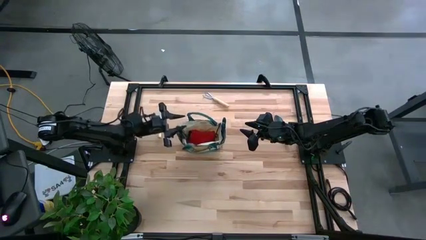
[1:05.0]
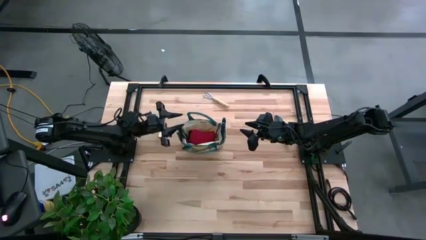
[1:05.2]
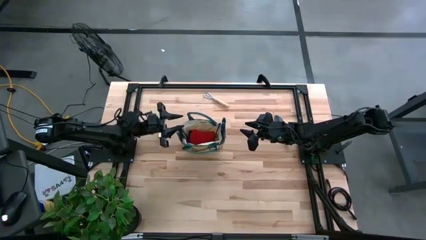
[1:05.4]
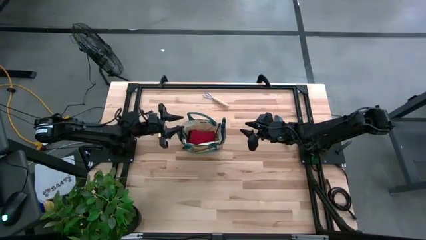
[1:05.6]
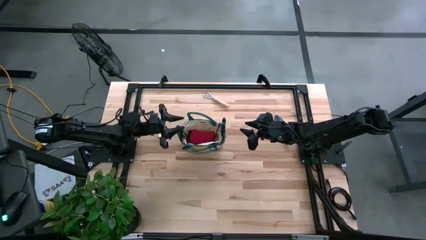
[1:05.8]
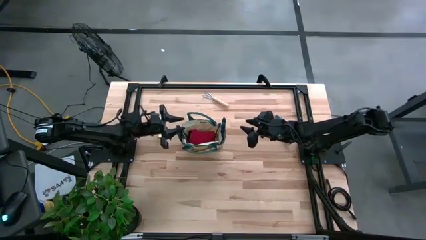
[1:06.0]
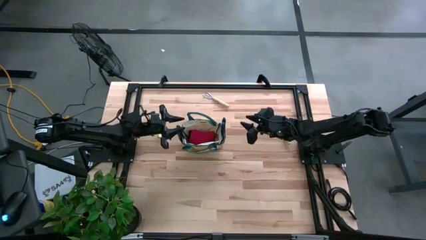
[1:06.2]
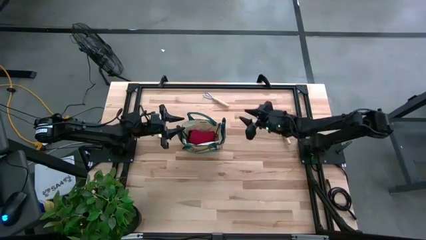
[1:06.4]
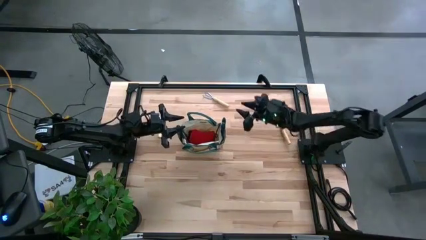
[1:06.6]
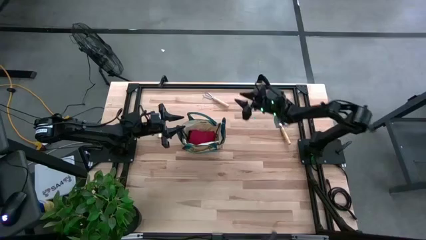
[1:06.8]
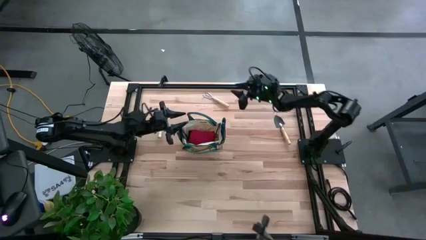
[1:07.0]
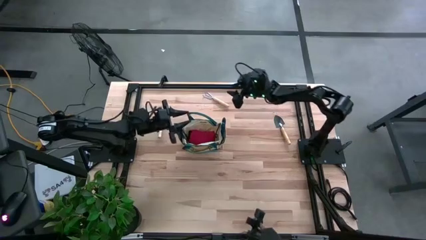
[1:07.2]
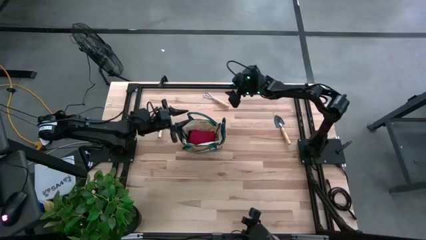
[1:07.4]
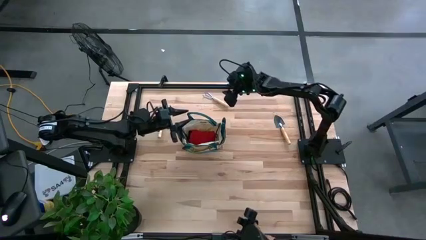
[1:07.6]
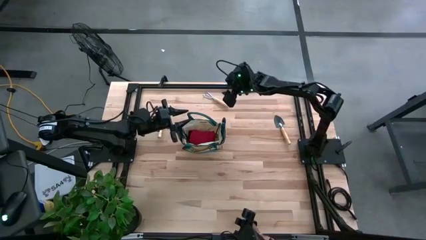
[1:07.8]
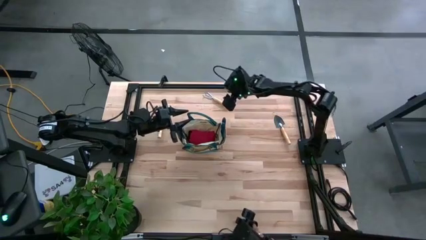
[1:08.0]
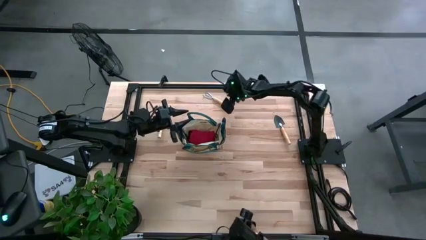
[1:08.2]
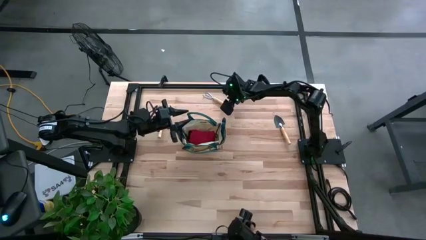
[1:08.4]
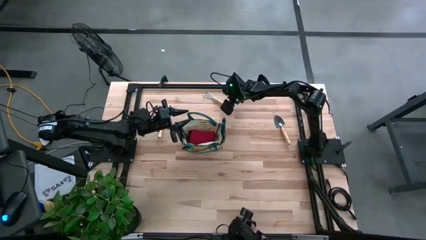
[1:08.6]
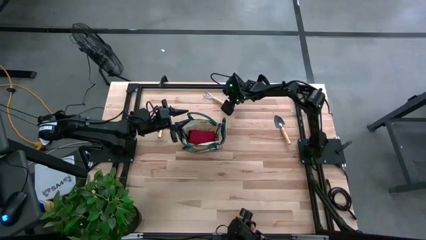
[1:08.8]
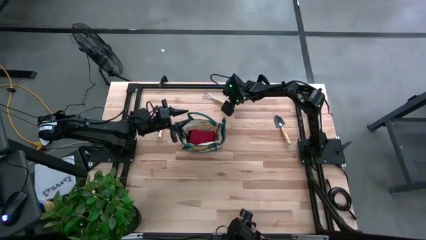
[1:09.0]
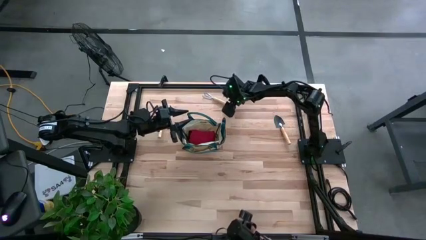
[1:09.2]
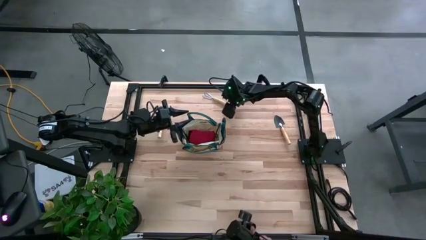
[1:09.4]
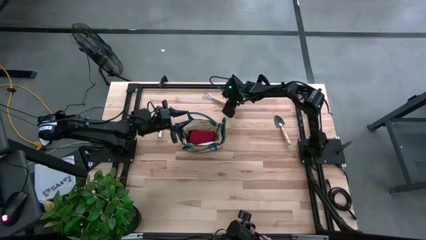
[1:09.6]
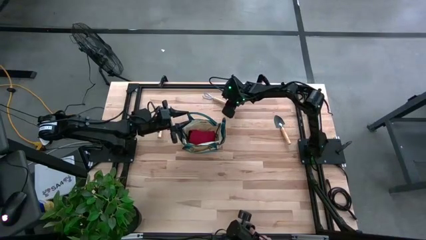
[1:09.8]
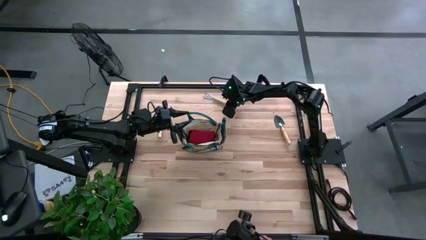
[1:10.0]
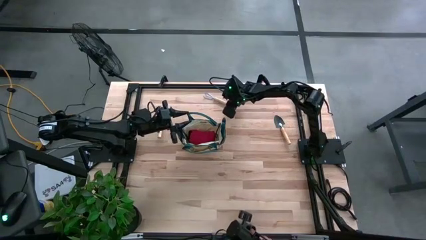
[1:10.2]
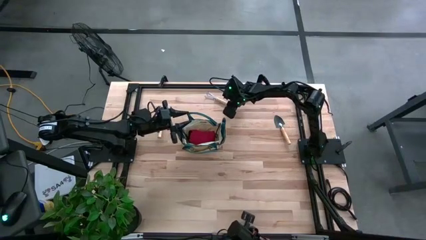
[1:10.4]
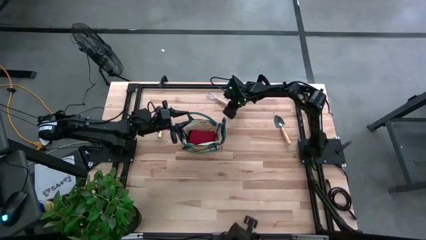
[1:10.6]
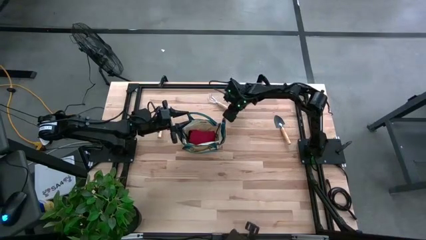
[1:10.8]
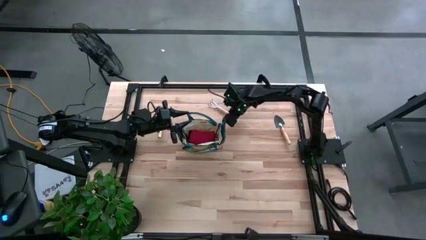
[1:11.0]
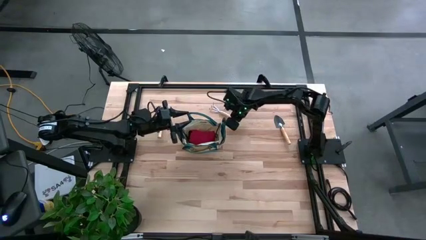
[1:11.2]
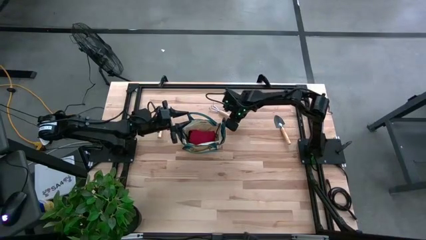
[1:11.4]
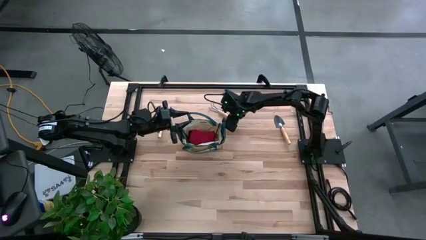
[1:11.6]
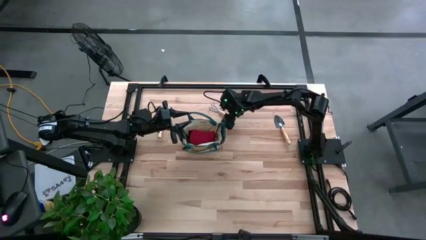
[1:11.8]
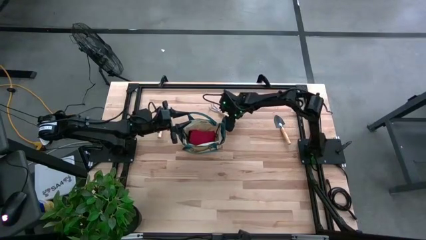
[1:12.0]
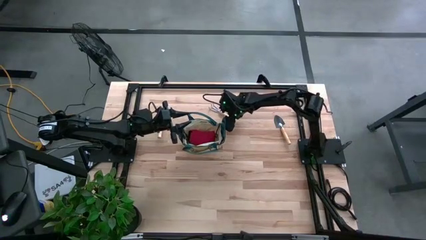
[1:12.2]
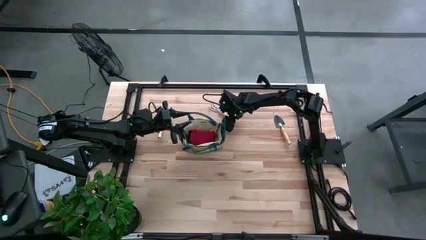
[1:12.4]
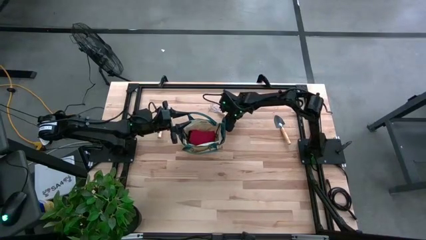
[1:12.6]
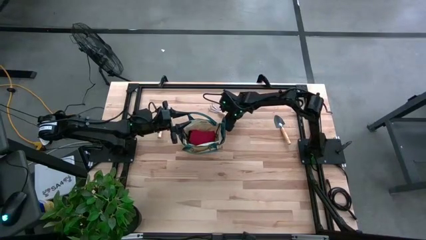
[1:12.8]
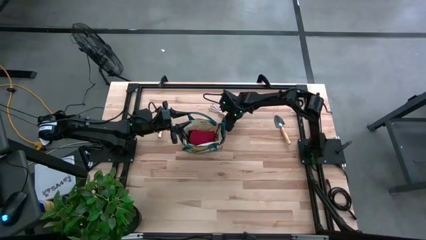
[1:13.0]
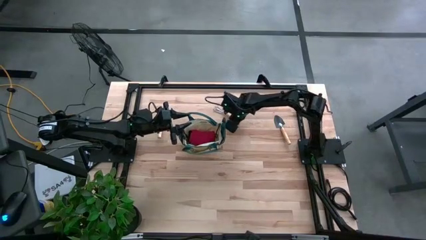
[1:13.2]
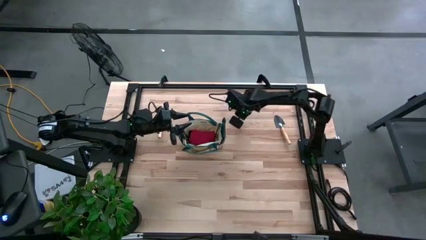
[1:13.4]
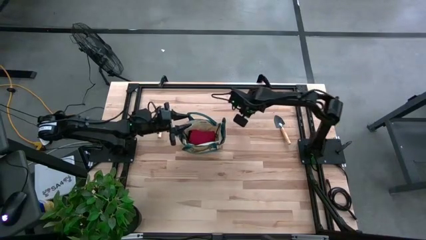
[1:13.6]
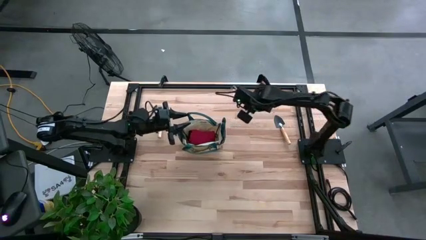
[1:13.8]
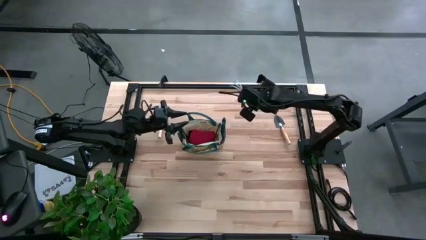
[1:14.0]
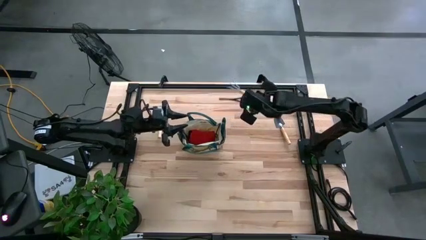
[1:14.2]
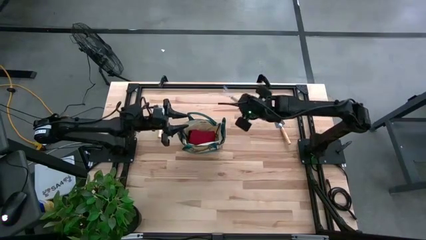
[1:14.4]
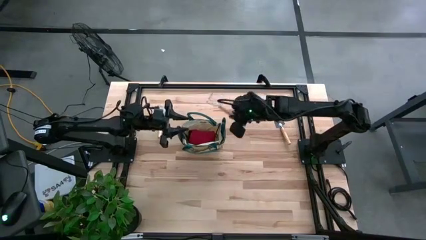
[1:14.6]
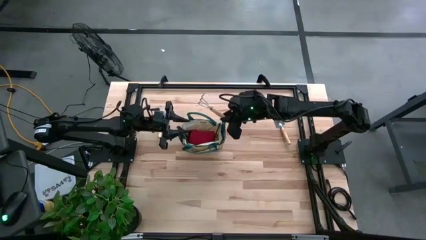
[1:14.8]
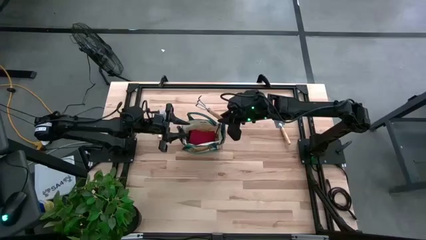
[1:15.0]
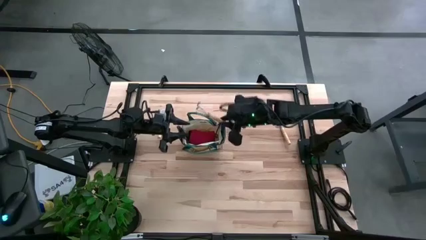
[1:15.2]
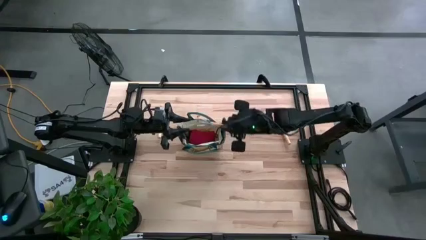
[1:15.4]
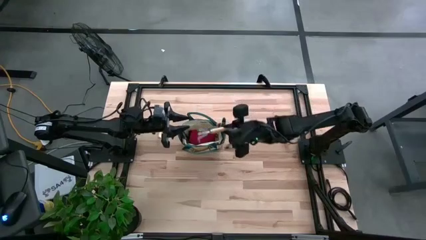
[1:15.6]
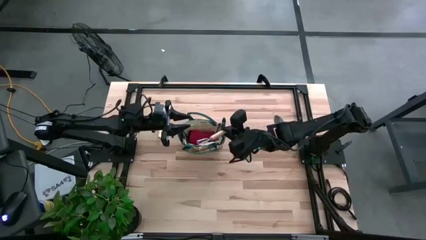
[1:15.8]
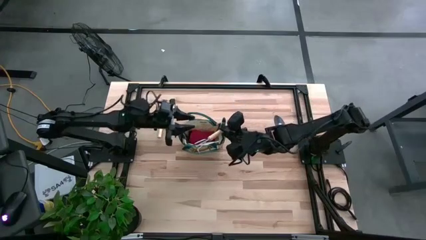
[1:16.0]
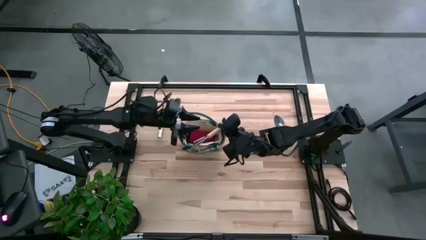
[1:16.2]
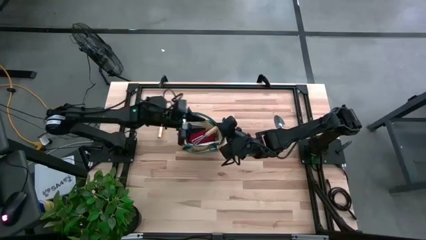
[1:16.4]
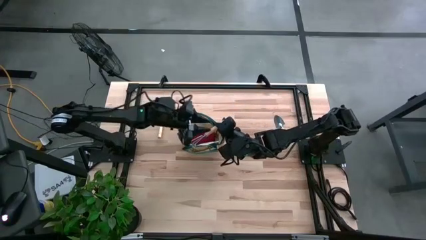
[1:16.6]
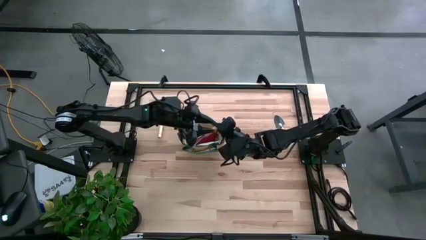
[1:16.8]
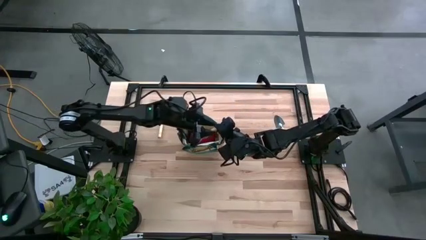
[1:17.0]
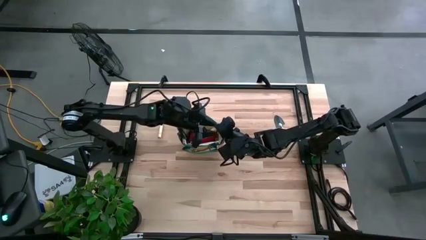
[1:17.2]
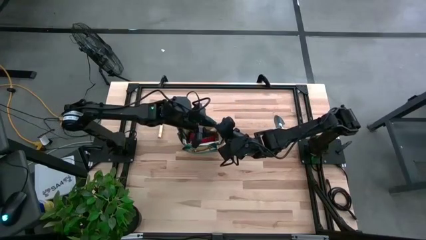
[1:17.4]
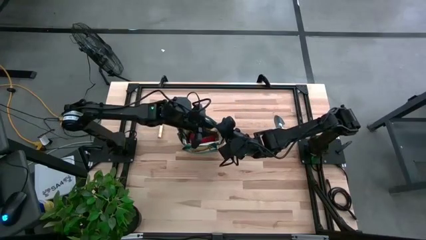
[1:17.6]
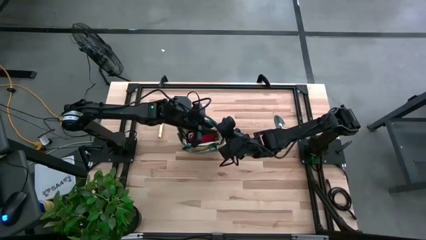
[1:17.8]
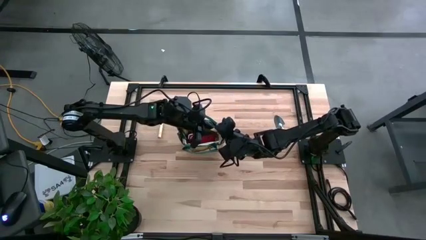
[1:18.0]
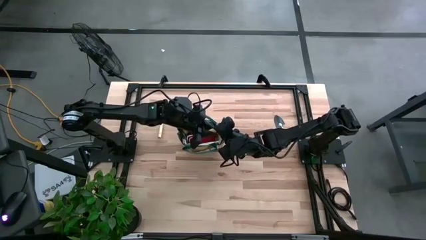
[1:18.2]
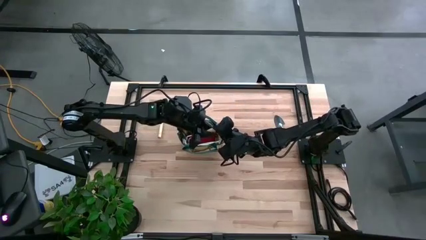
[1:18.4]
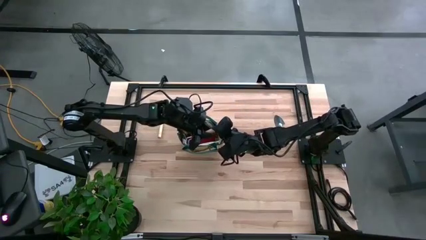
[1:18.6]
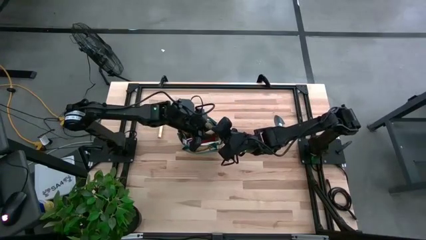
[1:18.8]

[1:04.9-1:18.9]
Task: Pick & Place Garden tools in Gardening bag
Put the light brown hand rake into the light brown gardening bag

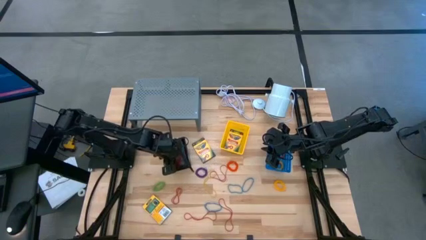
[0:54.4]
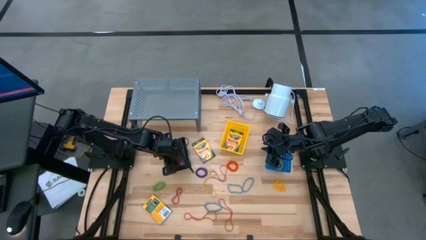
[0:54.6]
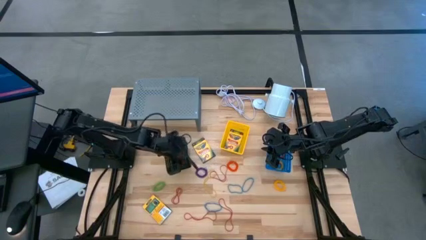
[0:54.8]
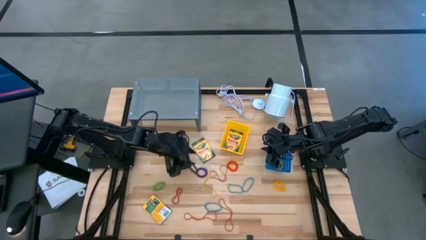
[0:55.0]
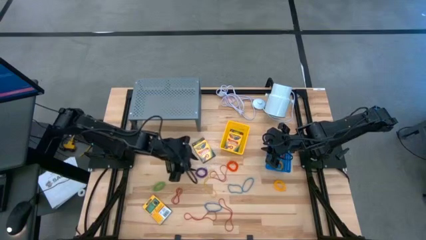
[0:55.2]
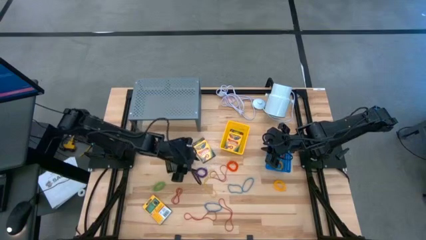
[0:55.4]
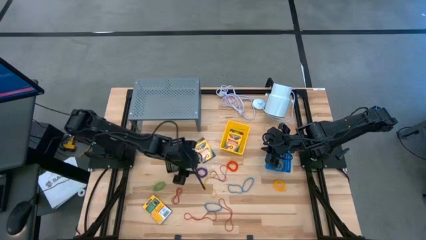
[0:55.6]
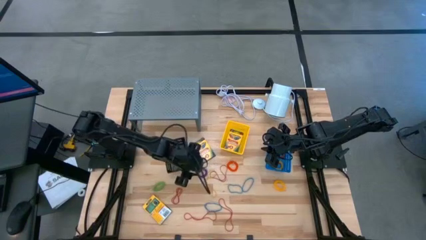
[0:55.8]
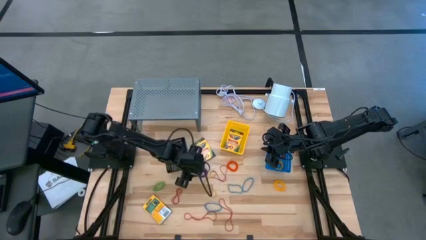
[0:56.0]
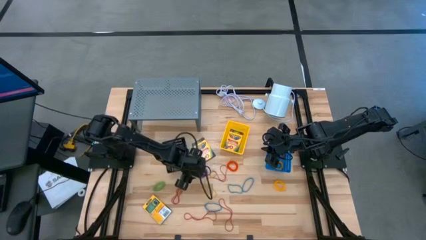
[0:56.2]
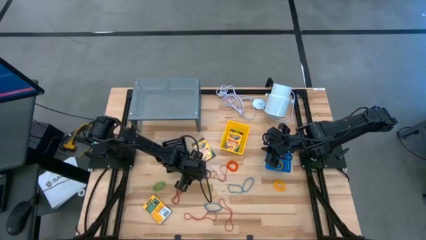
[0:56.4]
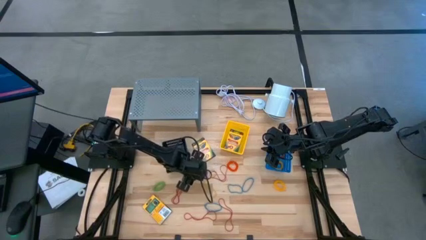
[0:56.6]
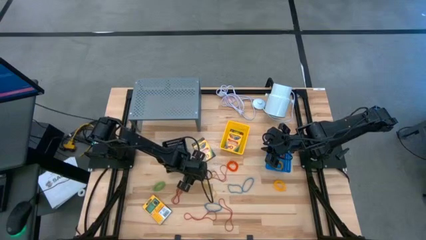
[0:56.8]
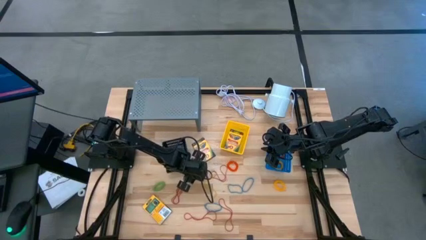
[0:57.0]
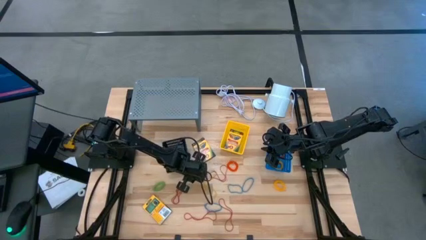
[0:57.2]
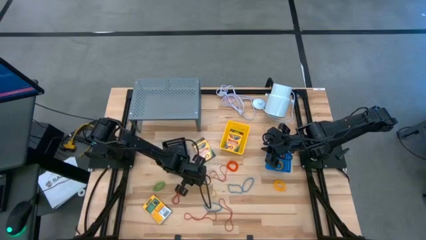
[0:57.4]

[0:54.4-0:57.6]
Task: Pick & Place Office Desk Supplies
Put the violet rubber band into the black bin
